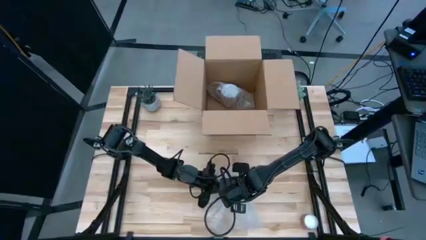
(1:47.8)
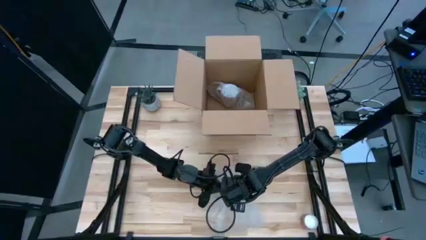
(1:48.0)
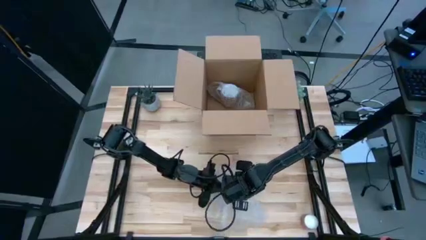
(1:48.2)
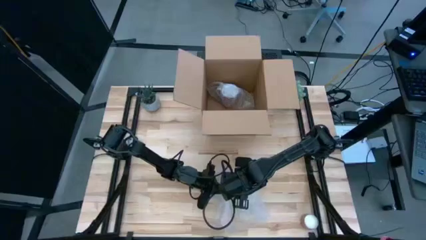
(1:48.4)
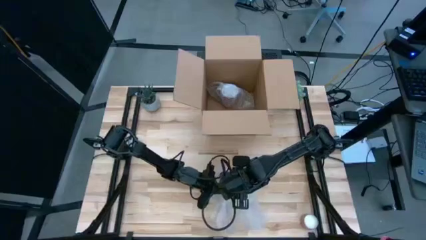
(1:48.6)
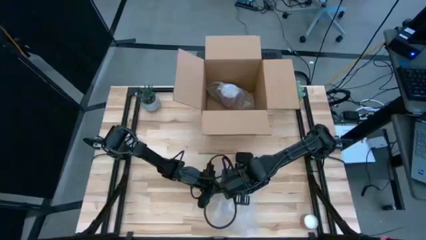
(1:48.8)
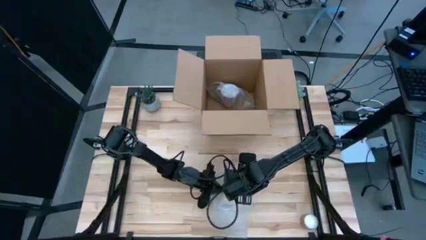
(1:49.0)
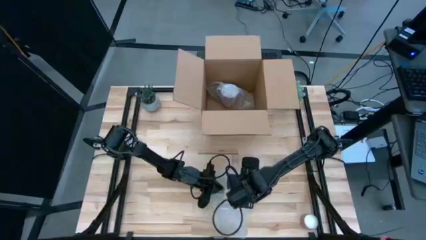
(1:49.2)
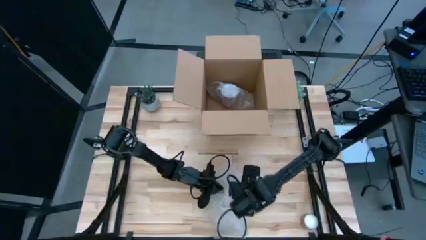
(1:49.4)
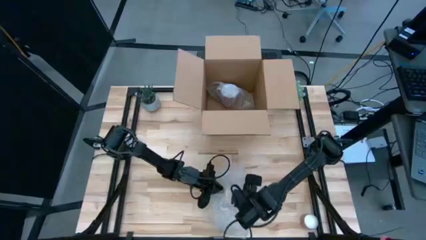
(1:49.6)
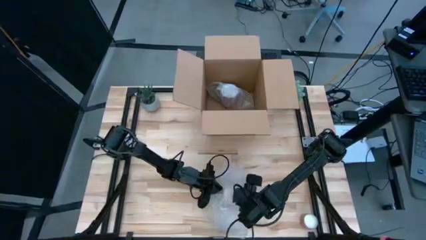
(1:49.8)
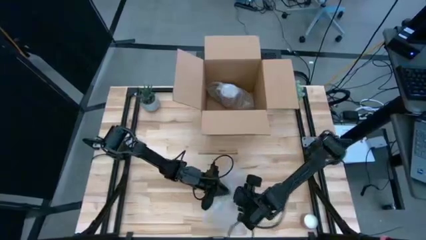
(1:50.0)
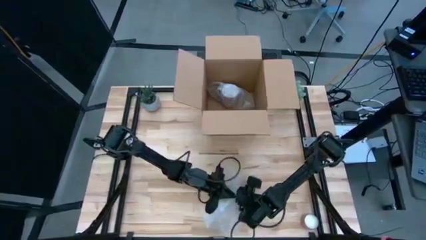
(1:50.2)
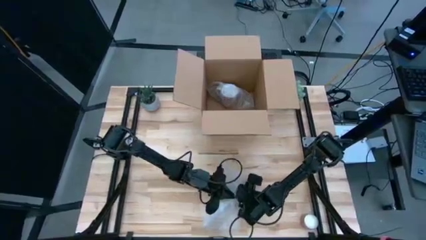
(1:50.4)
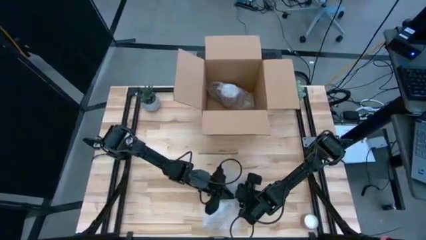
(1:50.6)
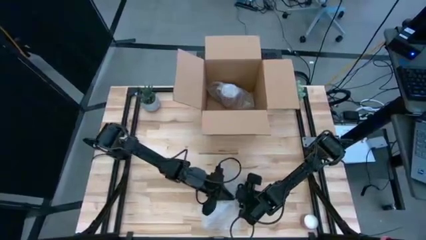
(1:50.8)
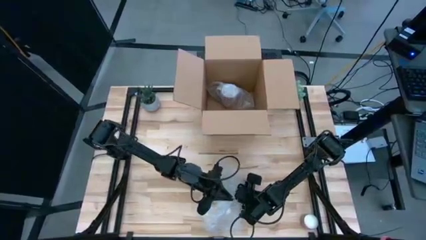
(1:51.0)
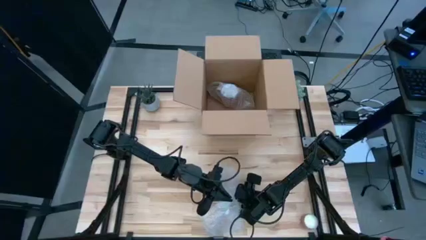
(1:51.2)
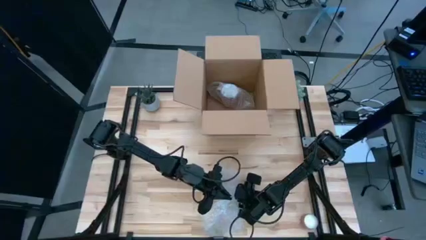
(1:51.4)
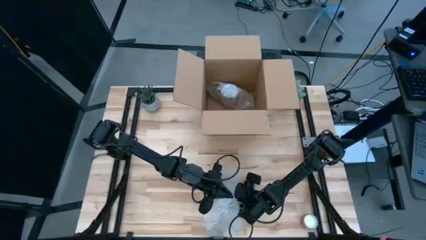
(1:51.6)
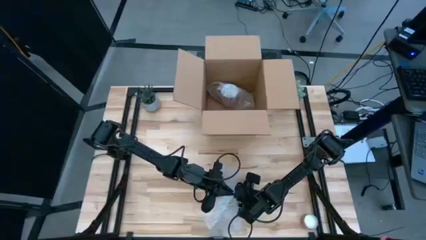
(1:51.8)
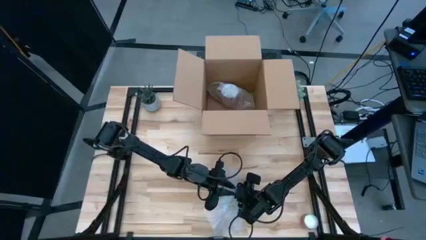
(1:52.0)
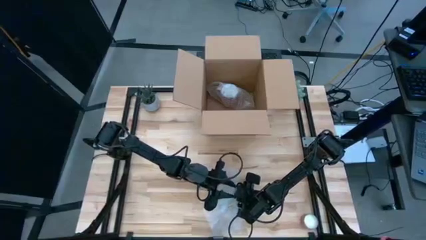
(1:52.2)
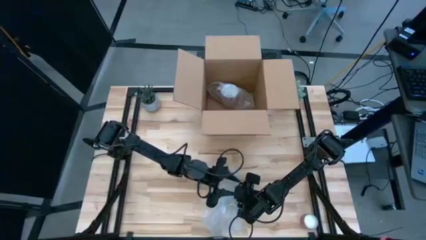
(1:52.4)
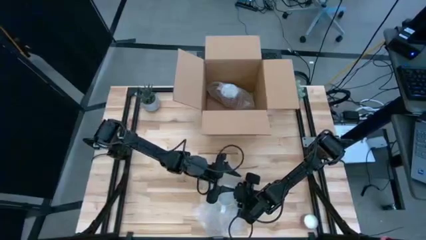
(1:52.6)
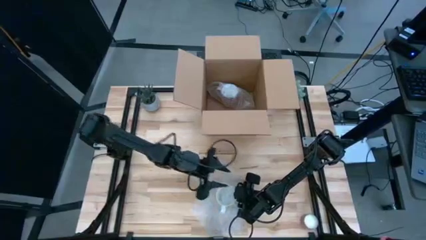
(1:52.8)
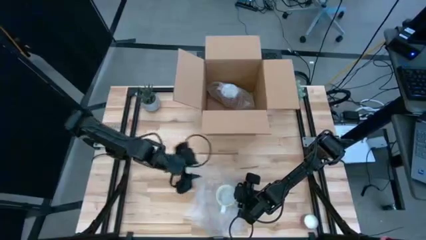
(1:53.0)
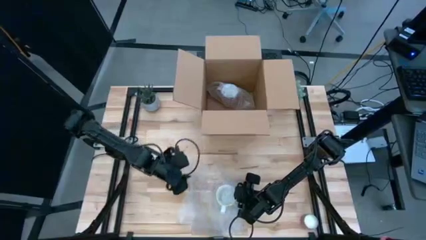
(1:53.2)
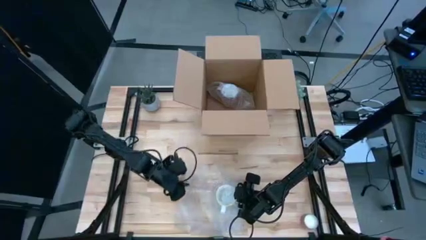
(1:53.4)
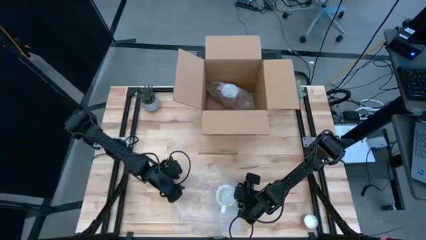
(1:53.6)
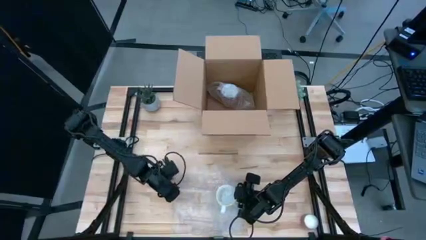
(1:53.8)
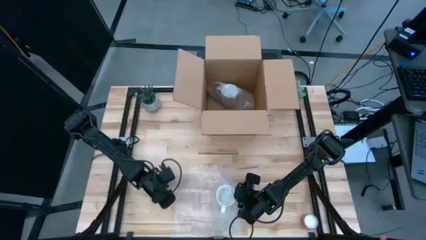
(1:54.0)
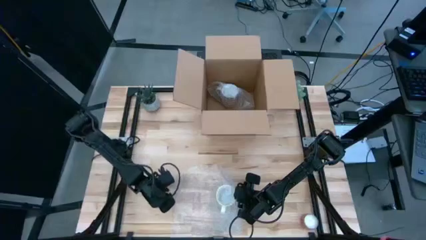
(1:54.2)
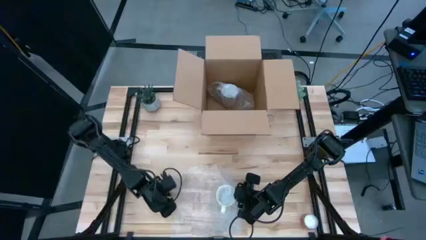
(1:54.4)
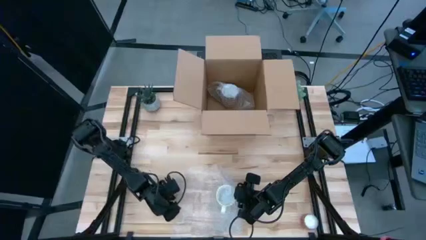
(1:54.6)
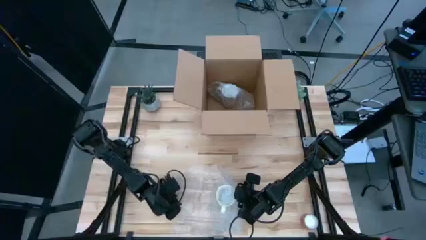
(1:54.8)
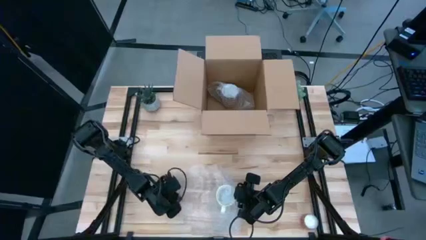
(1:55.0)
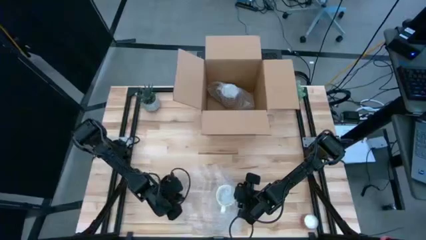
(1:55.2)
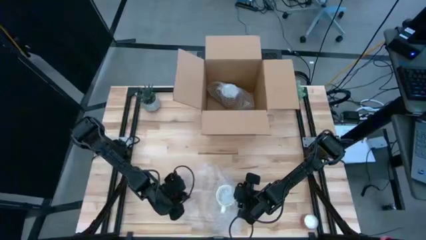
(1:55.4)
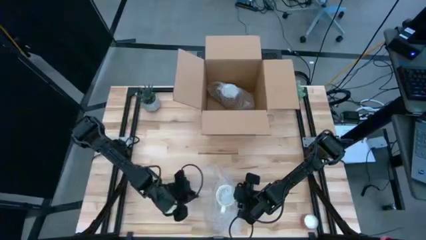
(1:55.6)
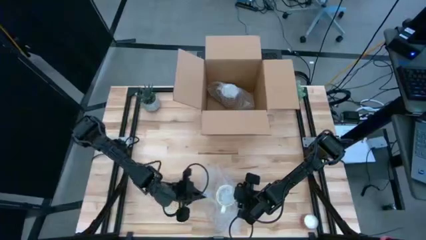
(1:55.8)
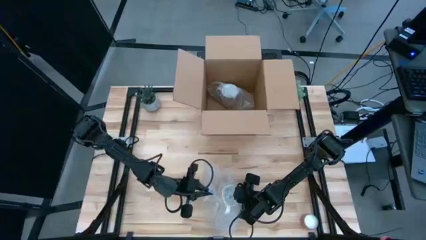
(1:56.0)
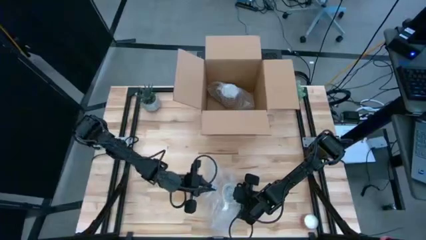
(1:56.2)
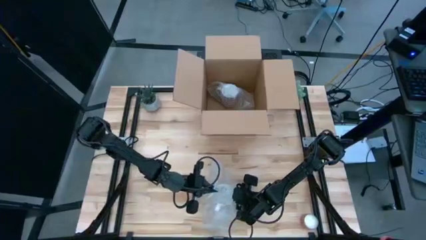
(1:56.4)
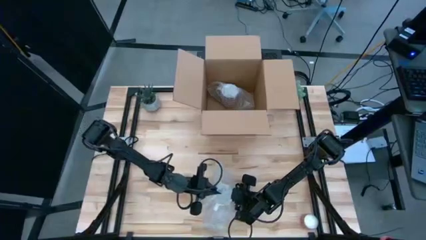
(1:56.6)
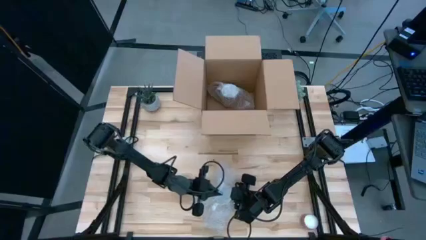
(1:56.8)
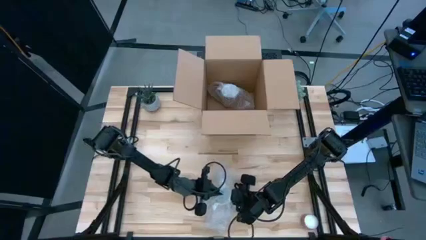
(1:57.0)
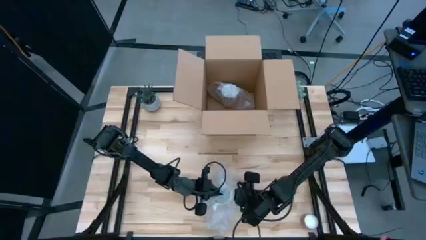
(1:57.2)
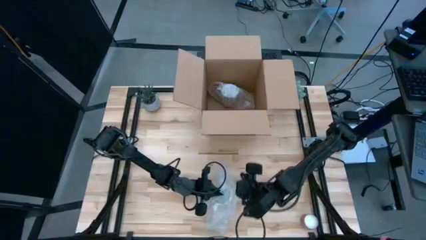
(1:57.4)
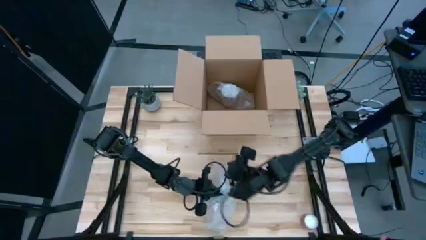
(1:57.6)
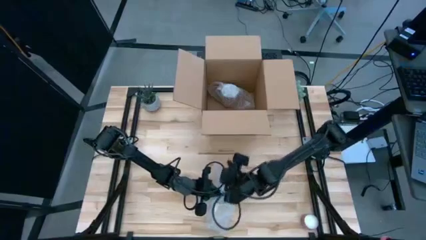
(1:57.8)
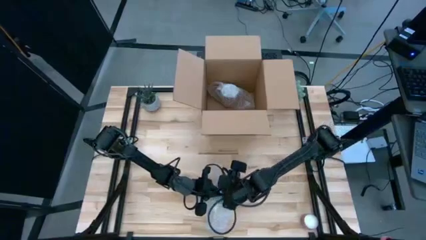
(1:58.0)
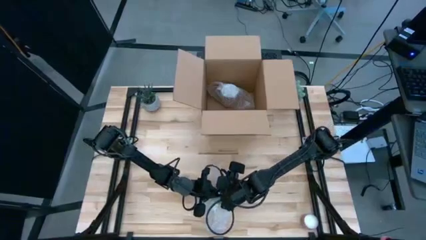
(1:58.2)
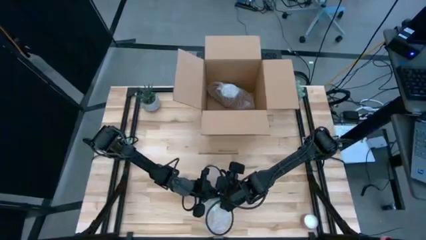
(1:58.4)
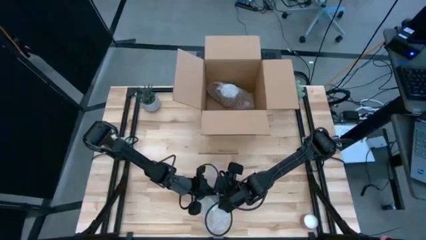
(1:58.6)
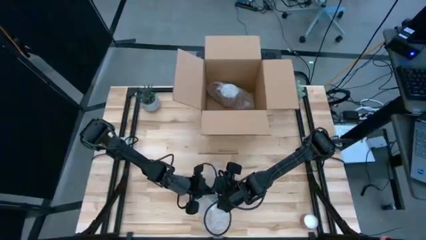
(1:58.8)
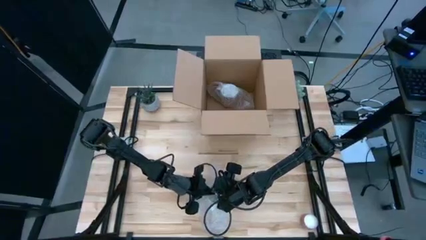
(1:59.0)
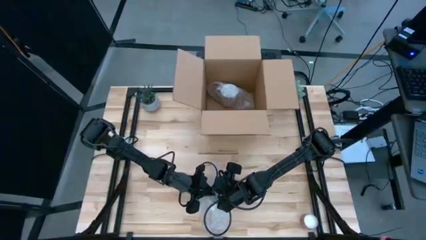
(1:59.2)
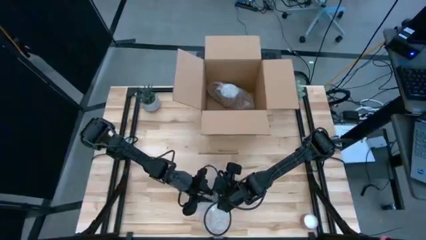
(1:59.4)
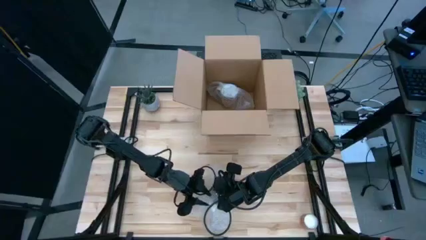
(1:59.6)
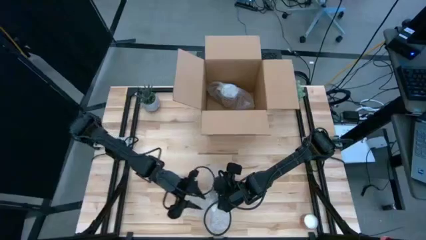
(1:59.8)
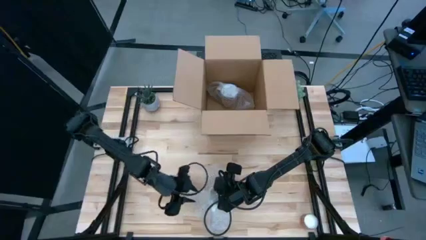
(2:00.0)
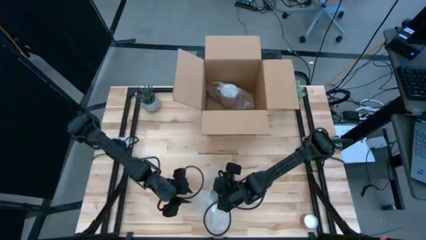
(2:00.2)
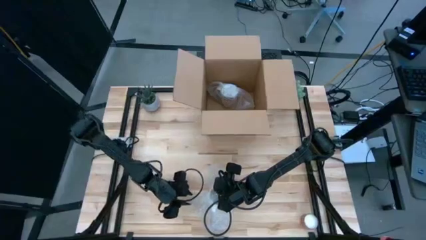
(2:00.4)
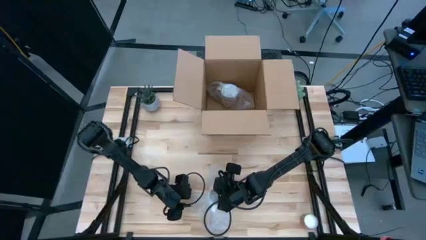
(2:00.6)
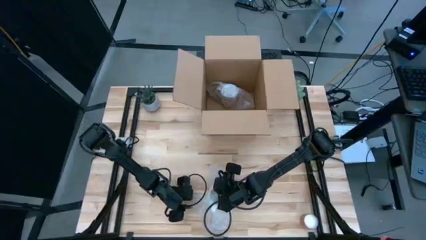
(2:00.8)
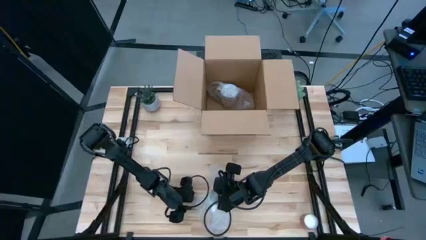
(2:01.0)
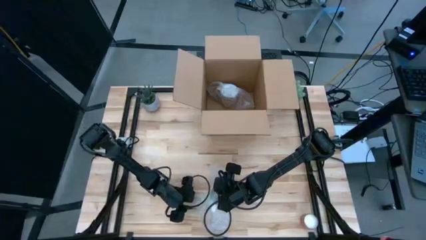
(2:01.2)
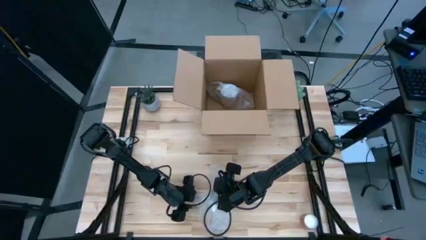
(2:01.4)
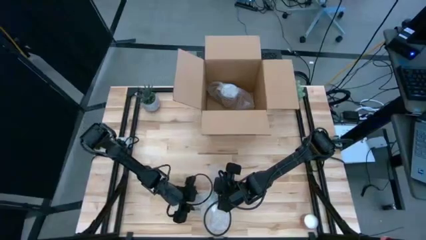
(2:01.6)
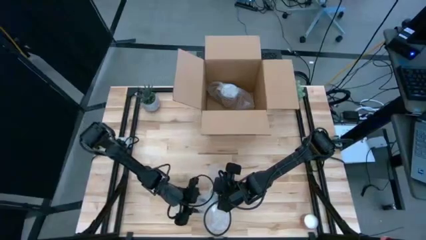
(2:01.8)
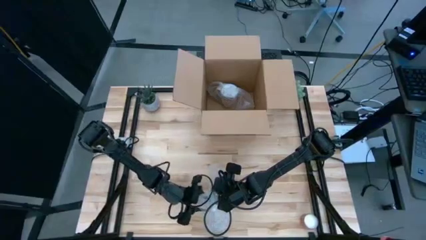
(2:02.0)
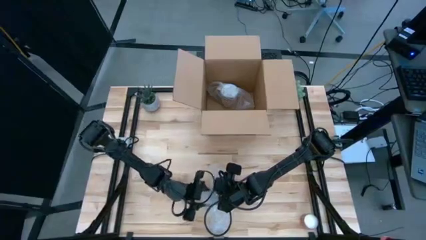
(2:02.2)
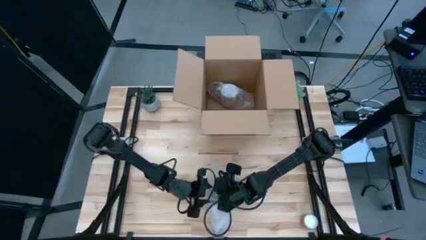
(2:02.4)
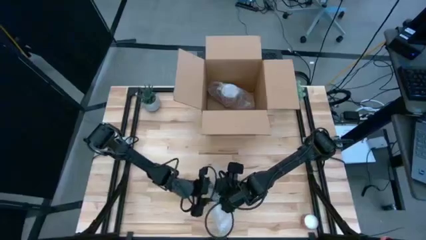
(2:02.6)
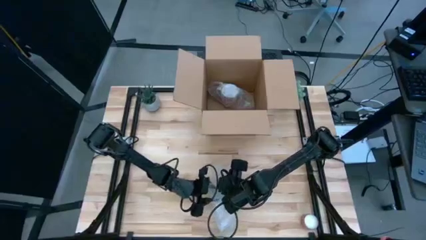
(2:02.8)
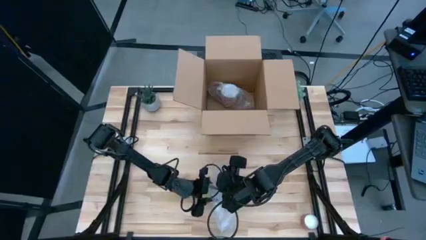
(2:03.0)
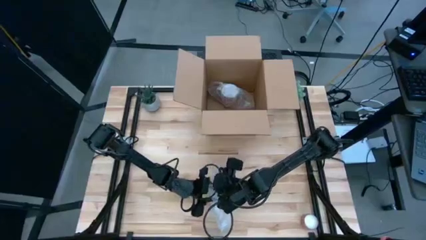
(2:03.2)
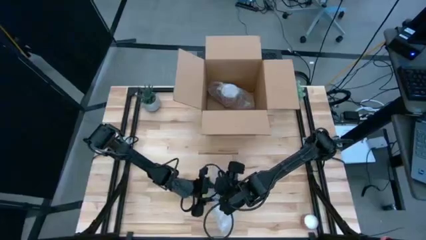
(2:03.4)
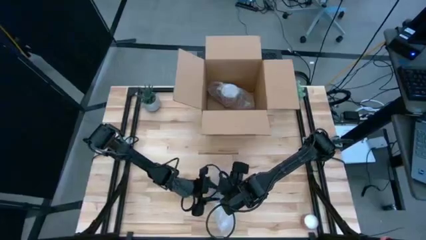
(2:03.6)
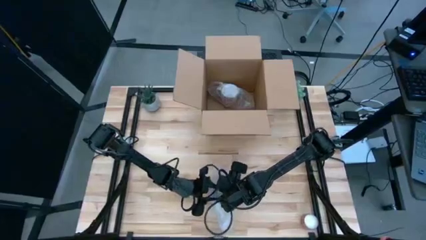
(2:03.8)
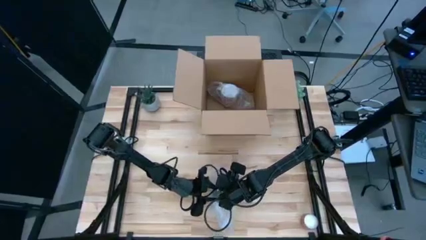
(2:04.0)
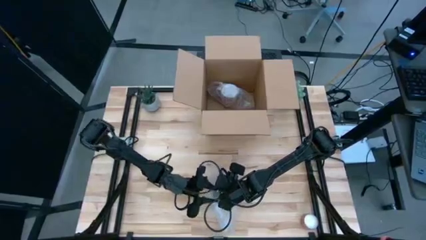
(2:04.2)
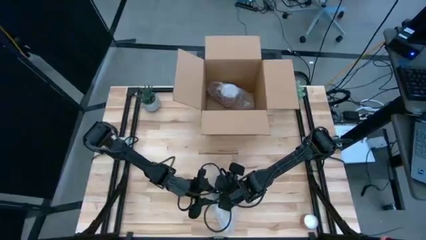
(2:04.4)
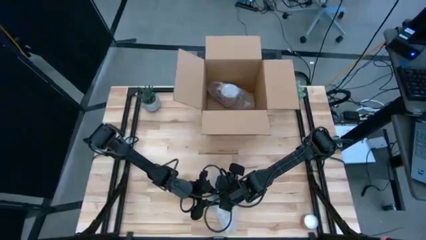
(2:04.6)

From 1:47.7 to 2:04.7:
Task: wrap mug
Wrap the orange patterned mug with the transparent bubble wrap
